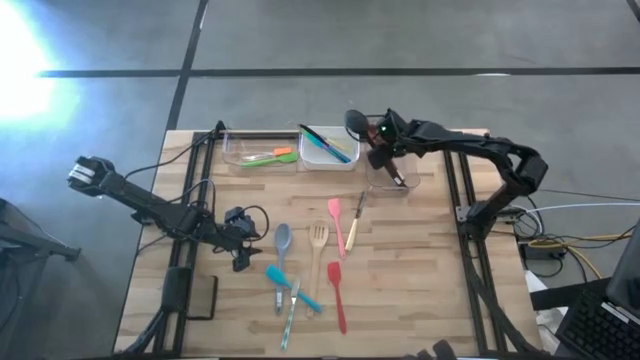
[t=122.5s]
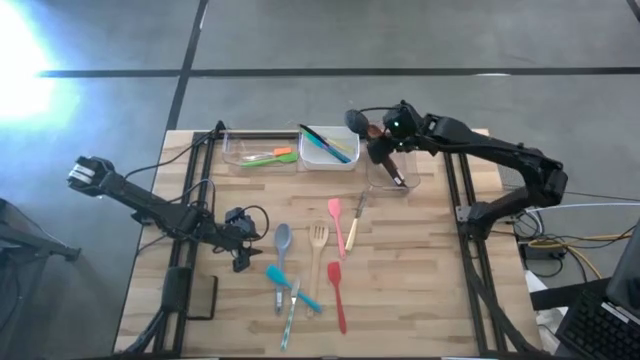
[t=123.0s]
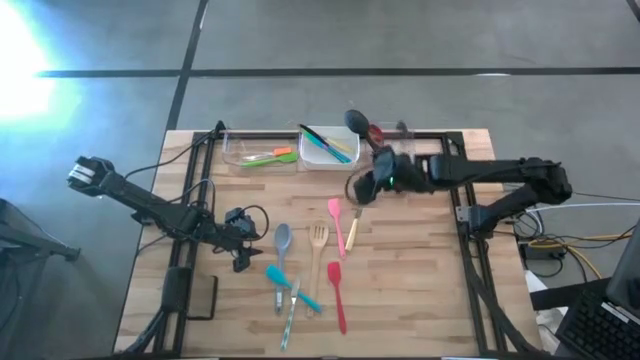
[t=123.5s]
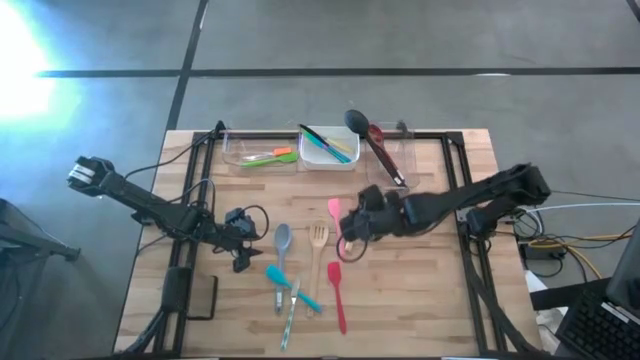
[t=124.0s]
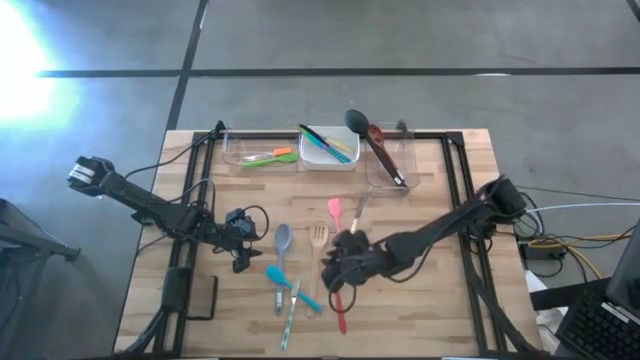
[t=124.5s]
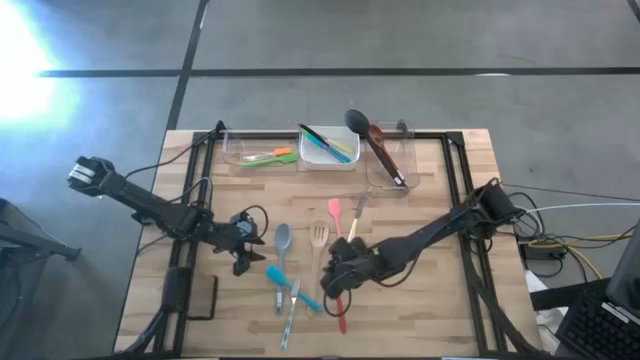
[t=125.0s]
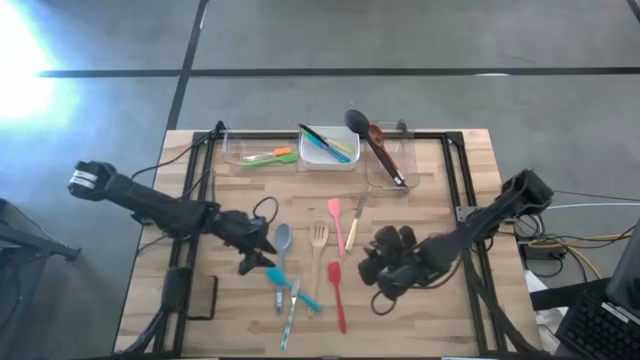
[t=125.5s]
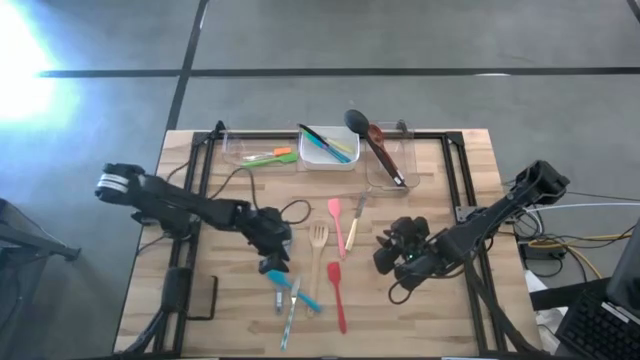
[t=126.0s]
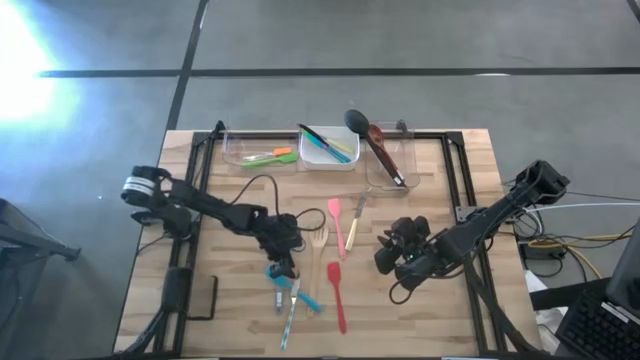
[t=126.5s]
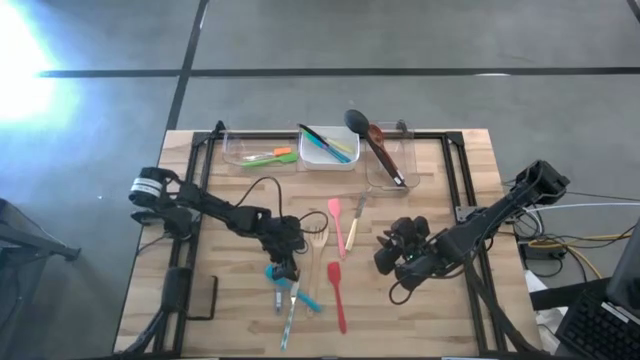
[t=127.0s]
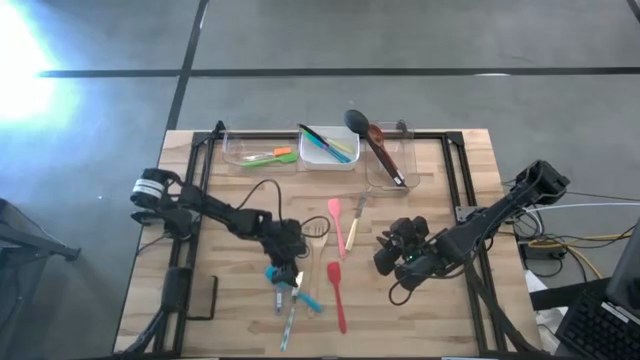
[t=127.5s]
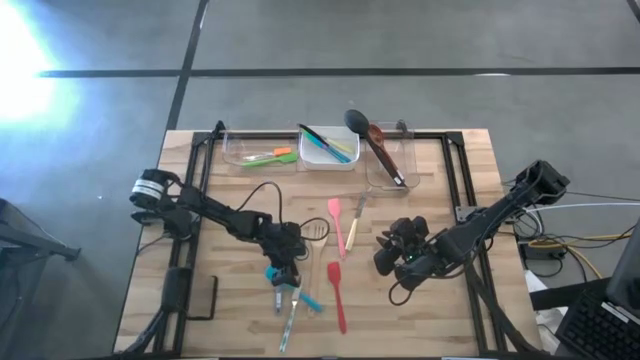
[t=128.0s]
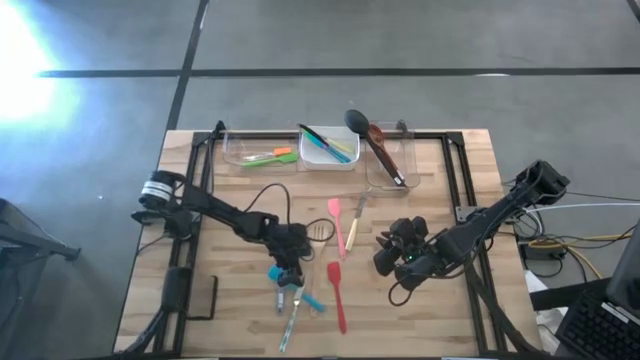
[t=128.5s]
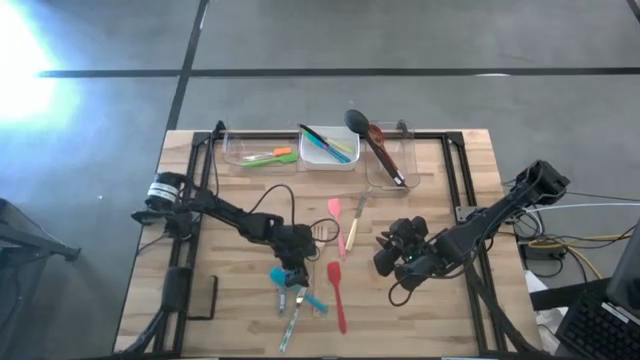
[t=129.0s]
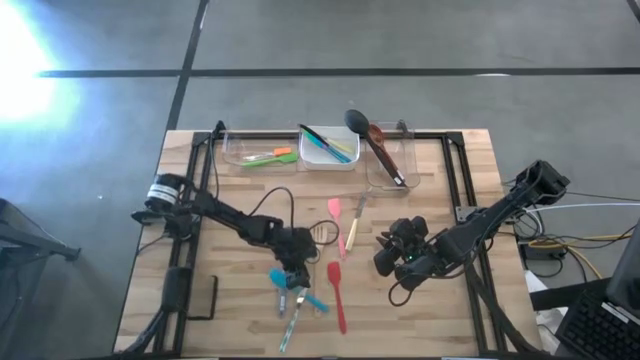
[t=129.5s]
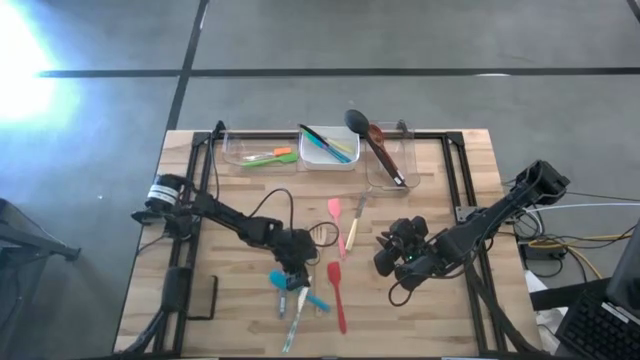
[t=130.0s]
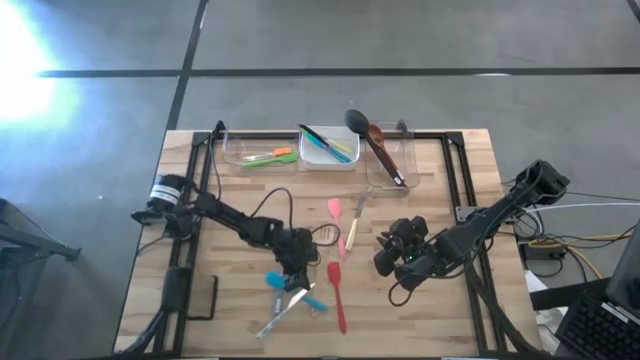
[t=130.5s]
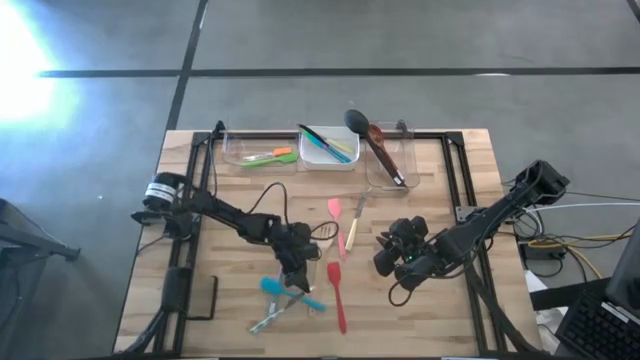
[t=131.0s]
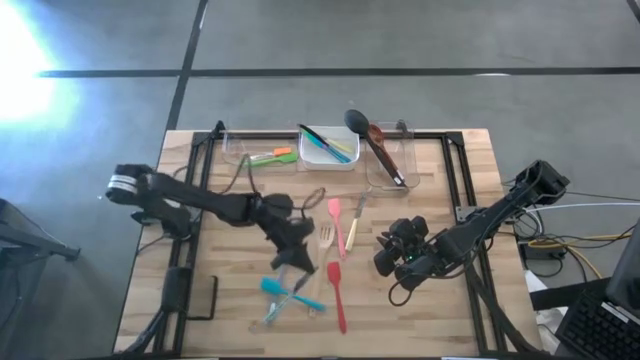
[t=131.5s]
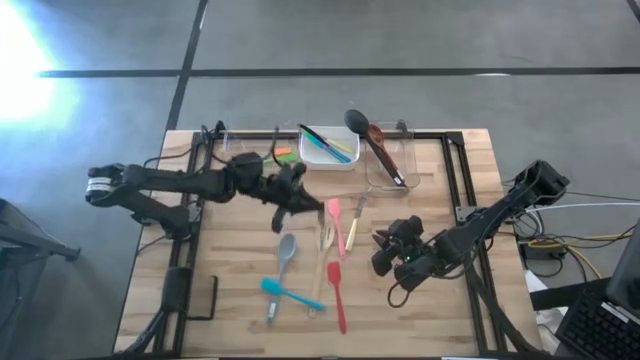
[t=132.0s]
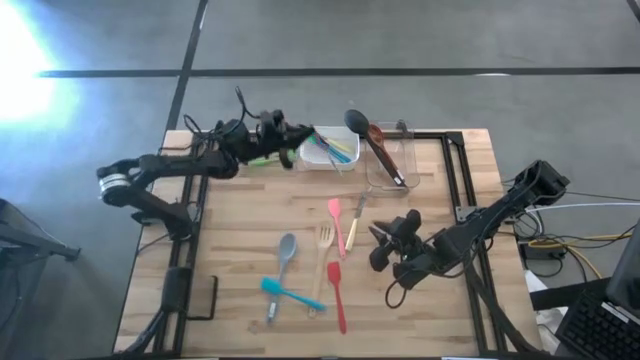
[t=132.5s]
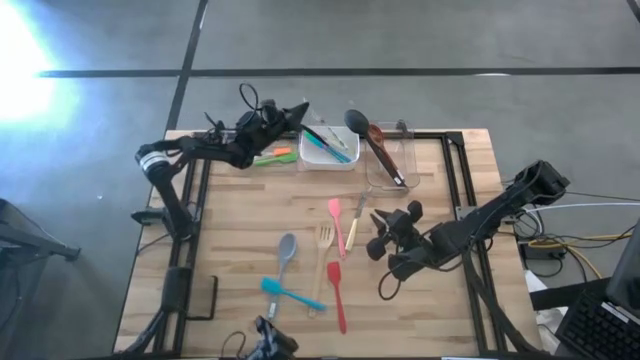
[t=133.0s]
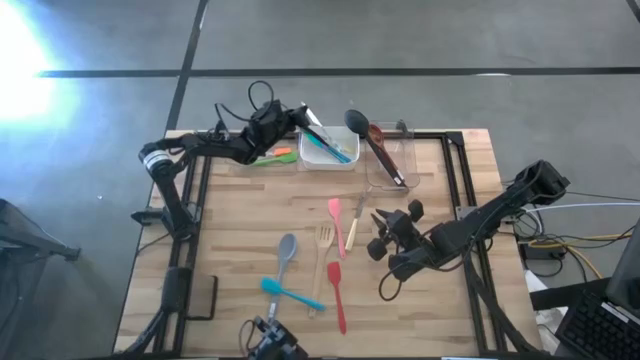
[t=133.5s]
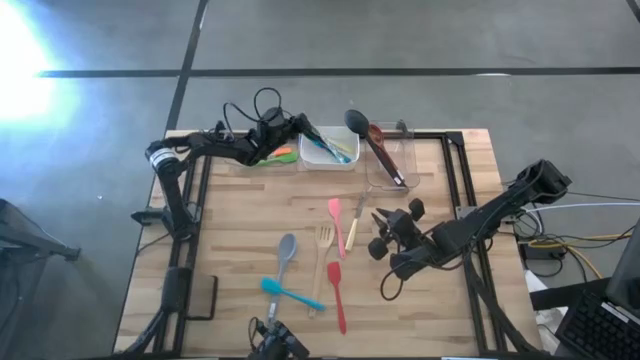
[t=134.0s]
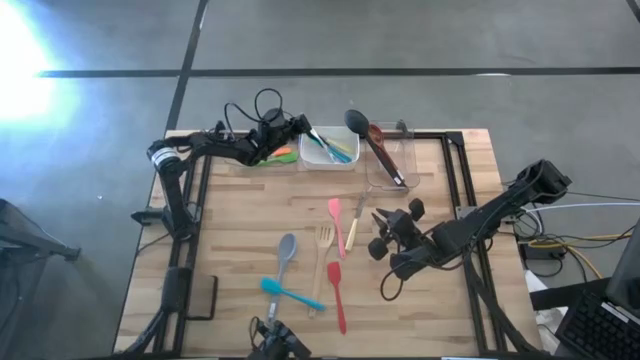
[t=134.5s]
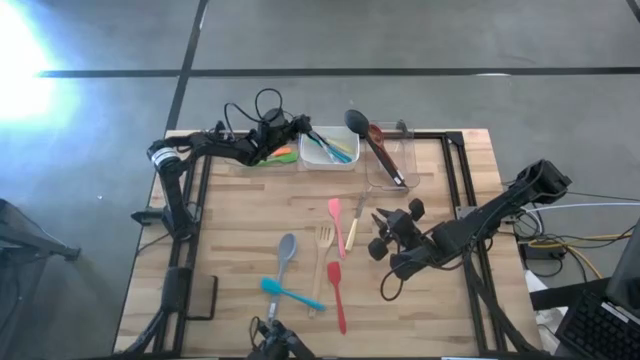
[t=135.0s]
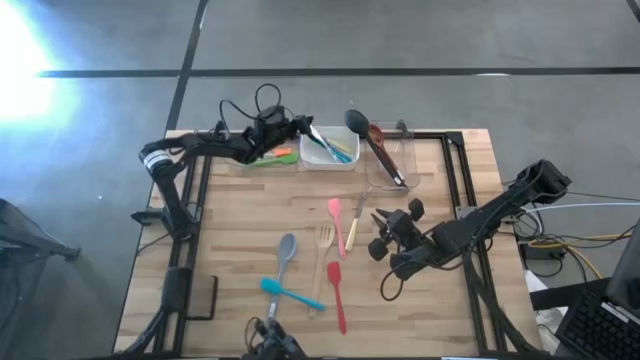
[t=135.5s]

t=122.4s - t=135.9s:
Task: Pick & Place Kitchen Items
Put the blue knife into the white bin

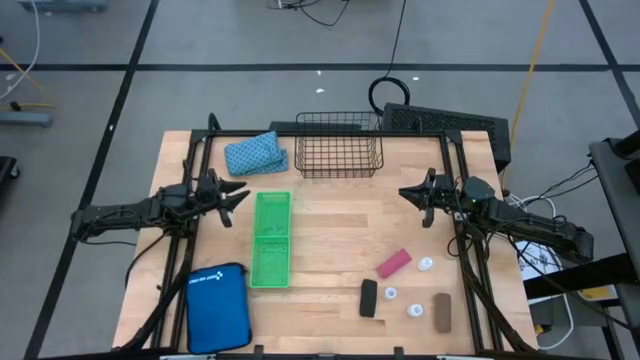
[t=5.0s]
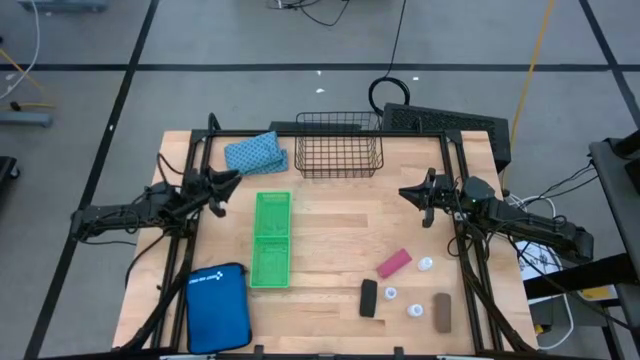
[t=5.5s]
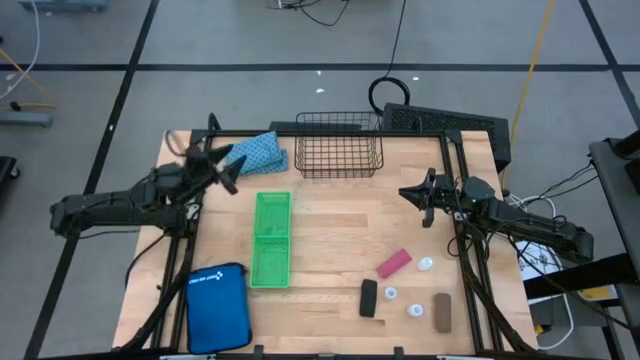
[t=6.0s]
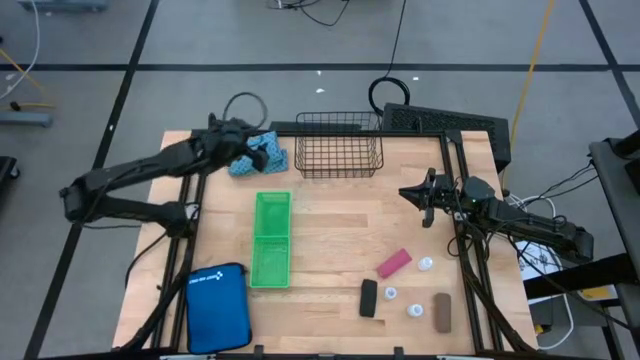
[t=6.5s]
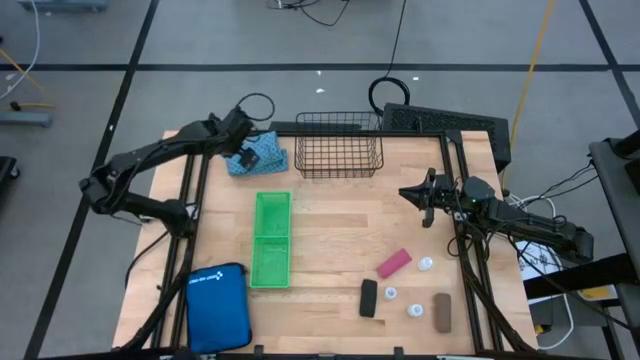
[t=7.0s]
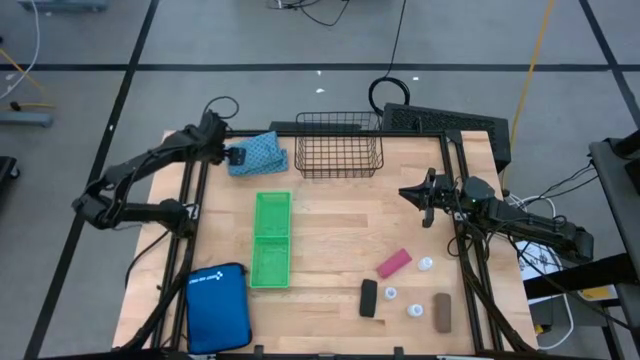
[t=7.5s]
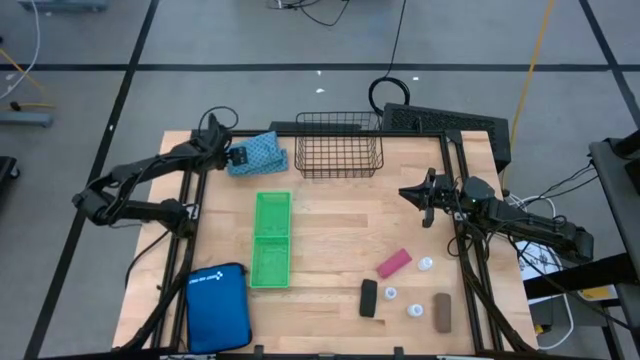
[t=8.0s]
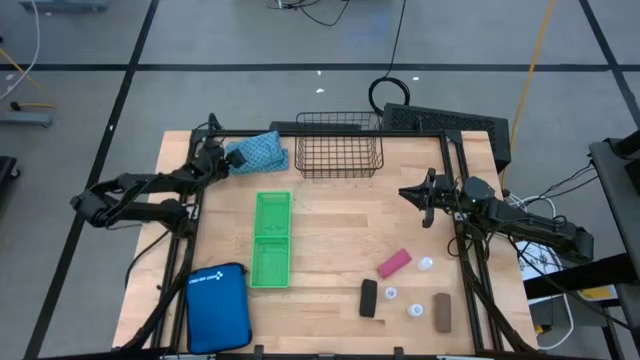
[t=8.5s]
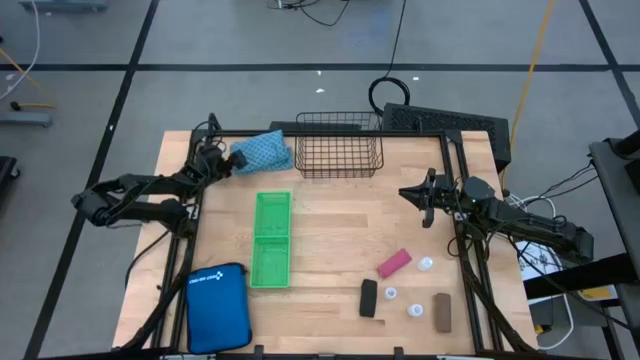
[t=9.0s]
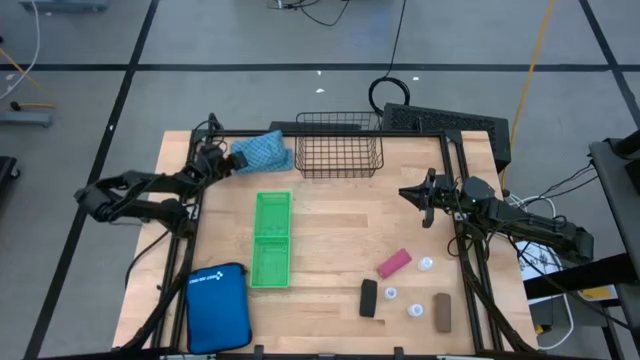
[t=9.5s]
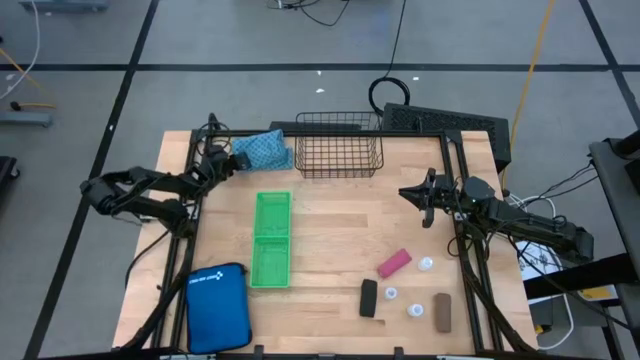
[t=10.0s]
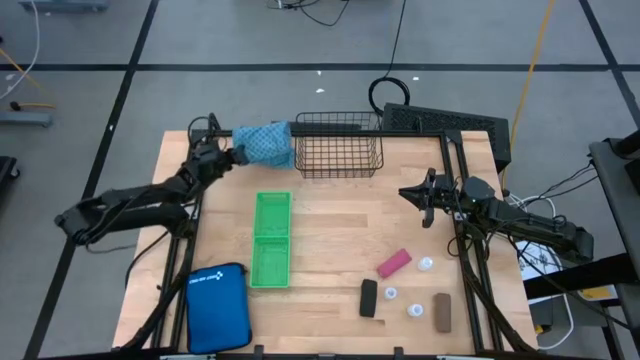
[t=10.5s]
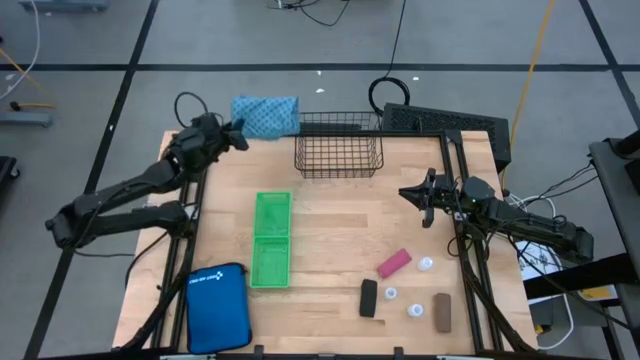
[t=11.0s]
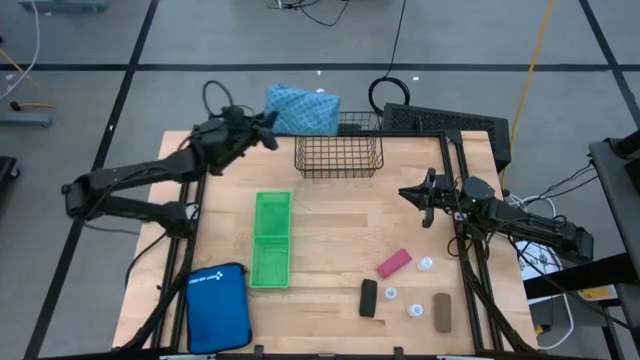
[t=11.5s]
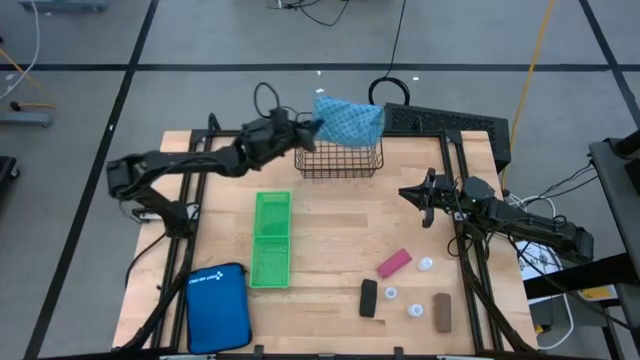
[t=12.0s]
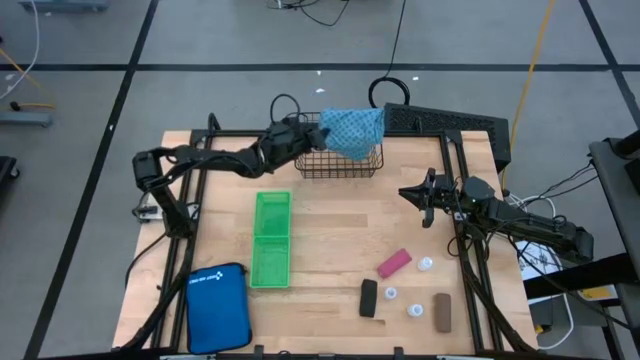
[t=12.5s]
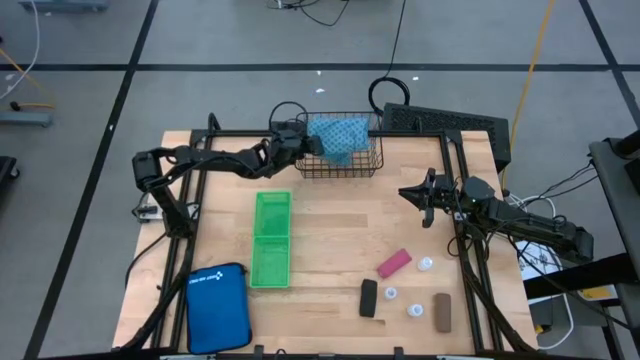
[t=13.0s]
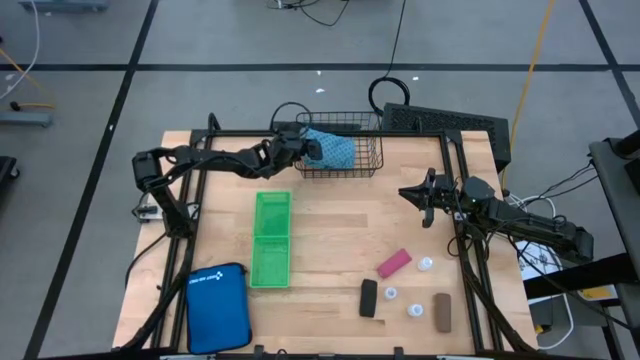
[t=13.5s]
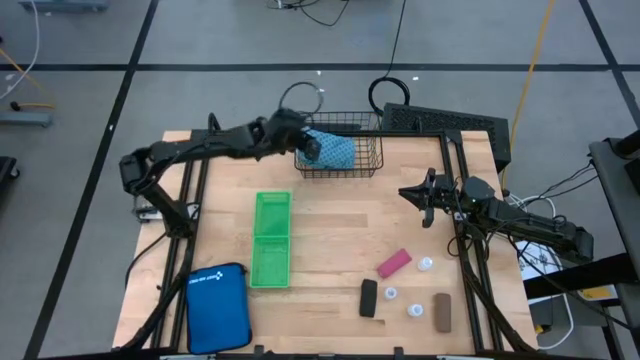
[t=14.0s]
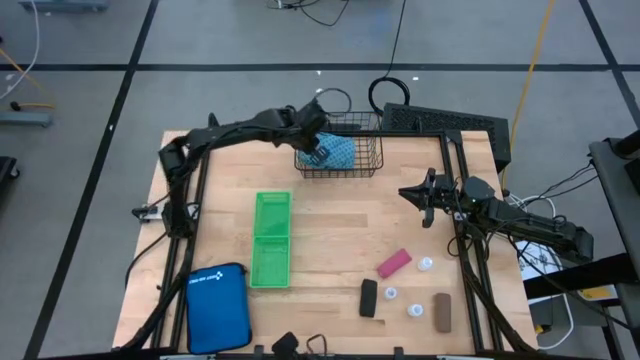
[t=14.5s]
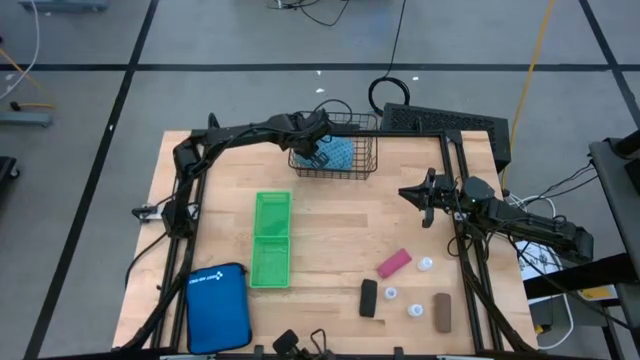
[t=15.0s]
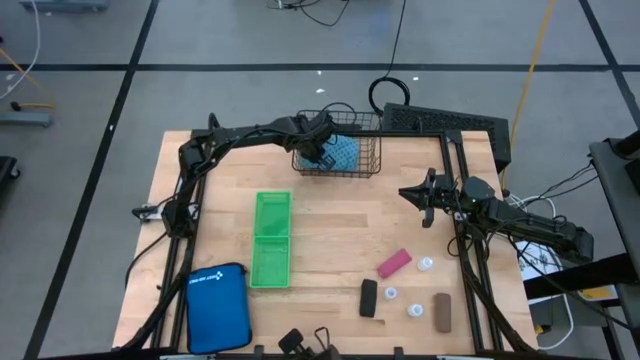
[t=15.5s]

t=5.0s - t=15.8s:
Task: Pick & Place Medicine items
Put the blue patient gown into the black wire basket
